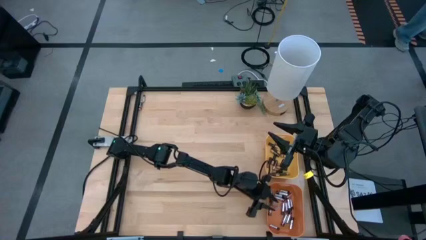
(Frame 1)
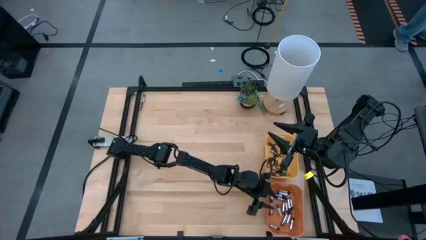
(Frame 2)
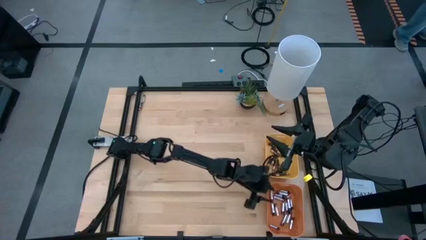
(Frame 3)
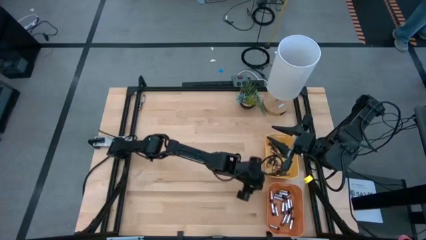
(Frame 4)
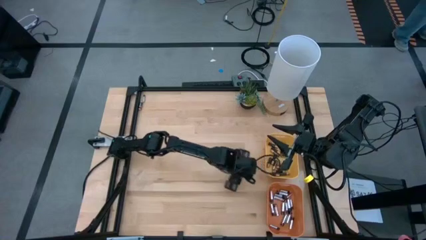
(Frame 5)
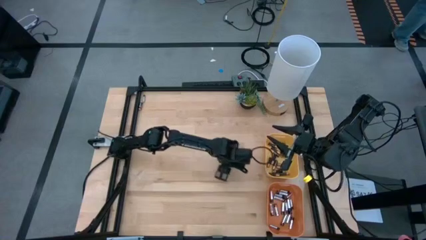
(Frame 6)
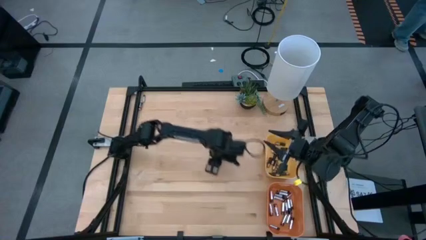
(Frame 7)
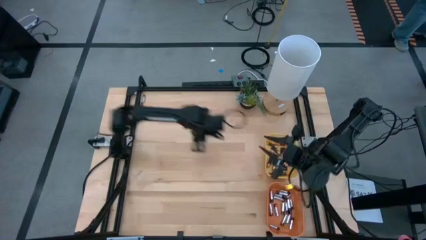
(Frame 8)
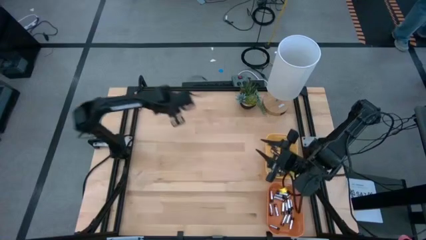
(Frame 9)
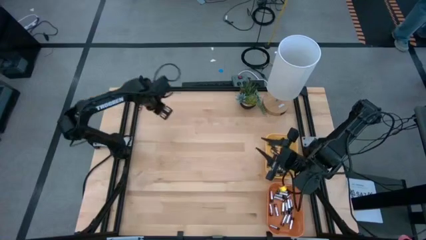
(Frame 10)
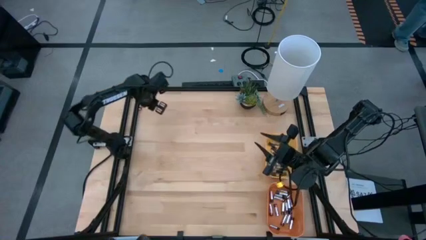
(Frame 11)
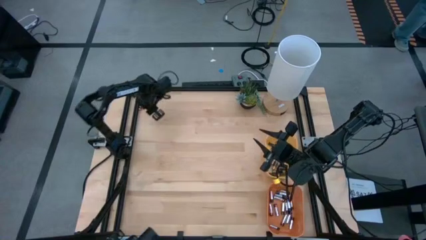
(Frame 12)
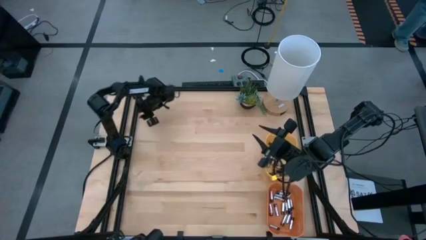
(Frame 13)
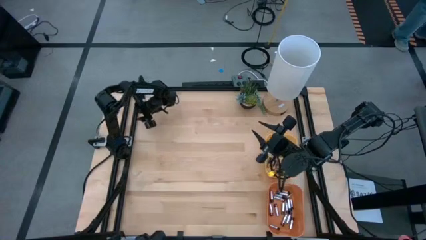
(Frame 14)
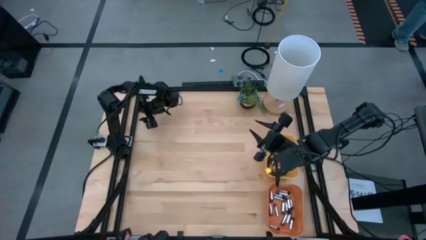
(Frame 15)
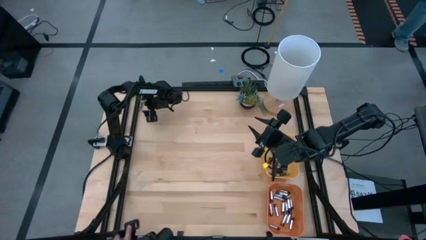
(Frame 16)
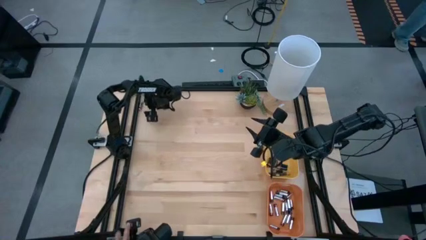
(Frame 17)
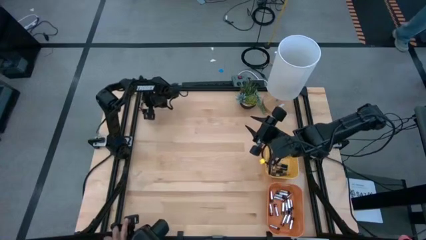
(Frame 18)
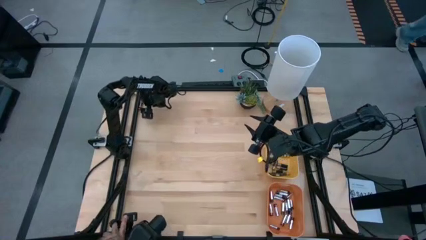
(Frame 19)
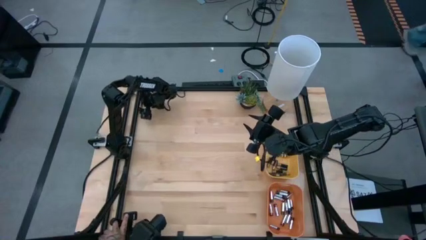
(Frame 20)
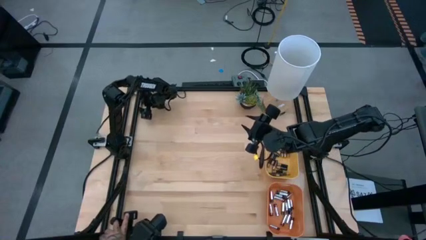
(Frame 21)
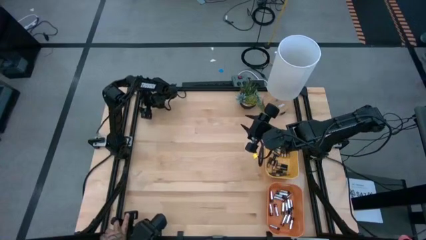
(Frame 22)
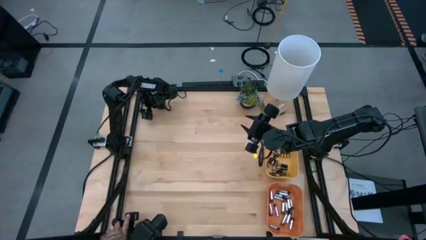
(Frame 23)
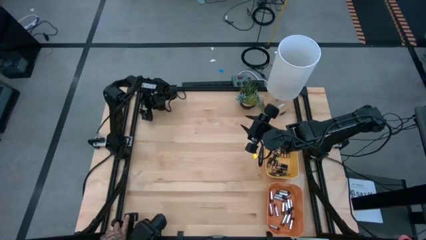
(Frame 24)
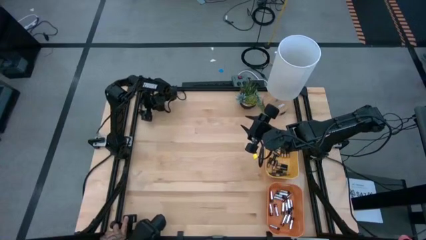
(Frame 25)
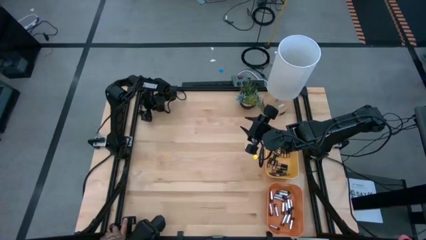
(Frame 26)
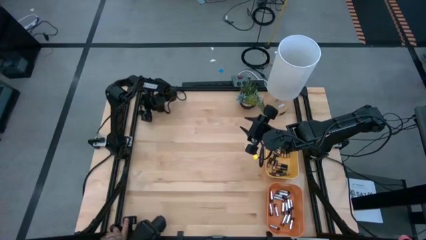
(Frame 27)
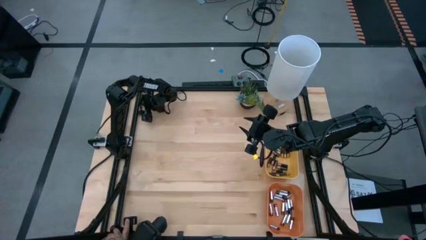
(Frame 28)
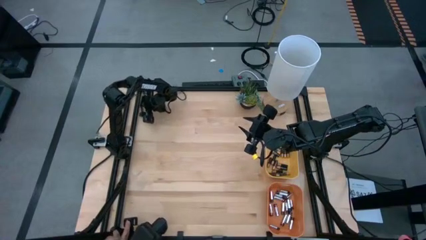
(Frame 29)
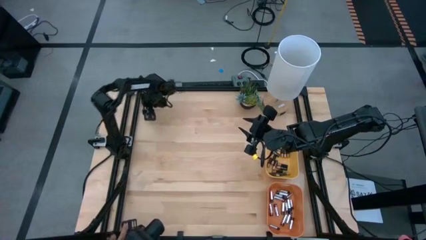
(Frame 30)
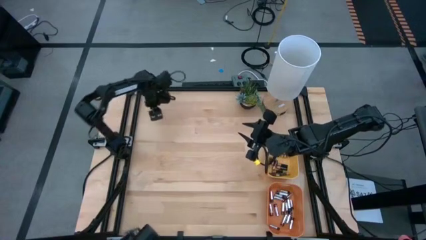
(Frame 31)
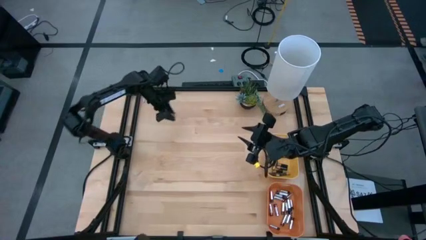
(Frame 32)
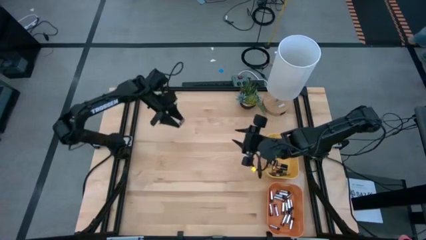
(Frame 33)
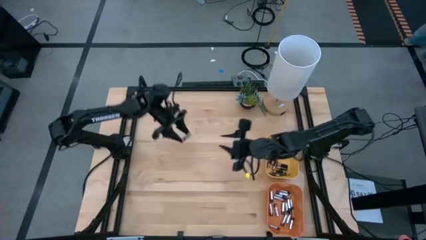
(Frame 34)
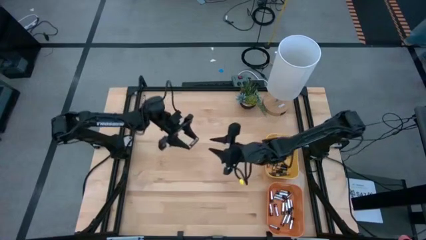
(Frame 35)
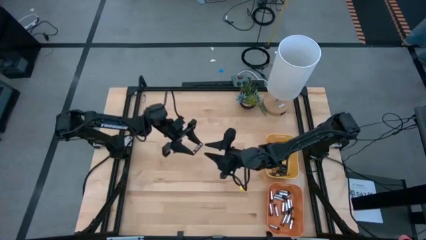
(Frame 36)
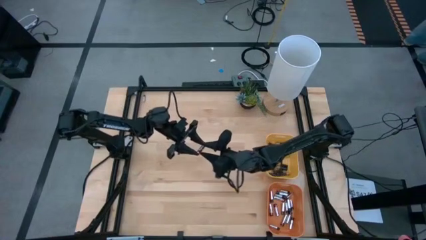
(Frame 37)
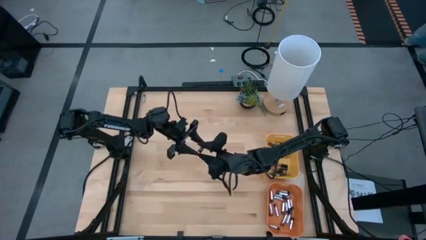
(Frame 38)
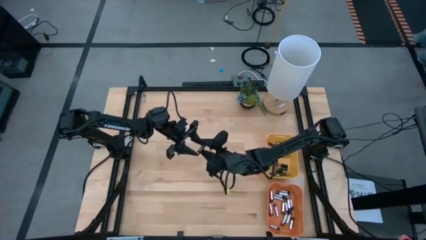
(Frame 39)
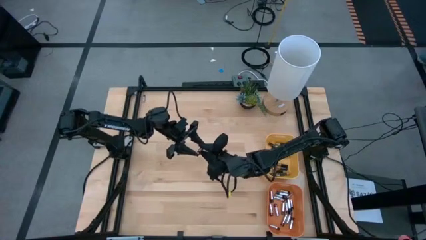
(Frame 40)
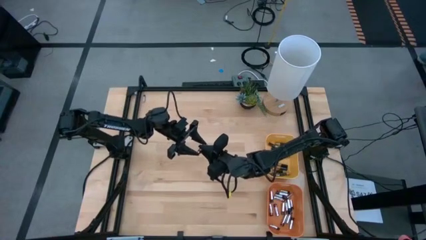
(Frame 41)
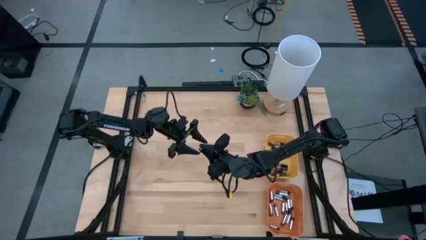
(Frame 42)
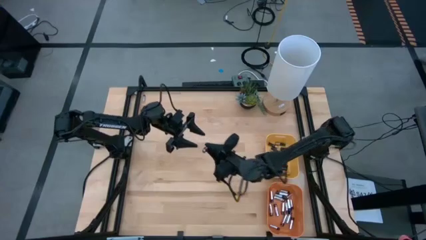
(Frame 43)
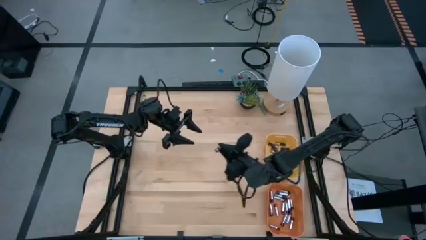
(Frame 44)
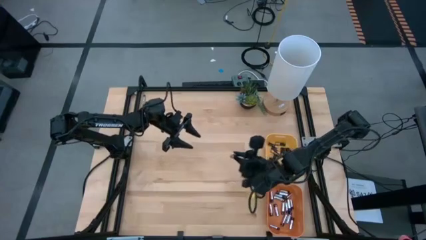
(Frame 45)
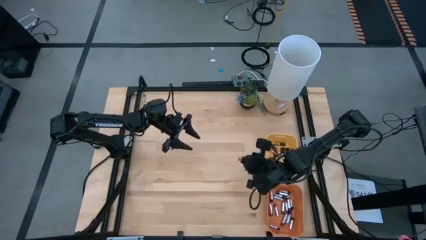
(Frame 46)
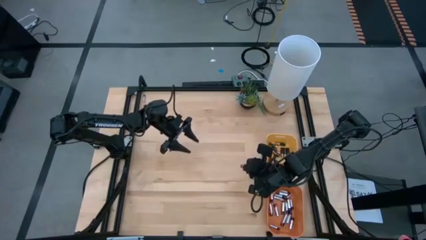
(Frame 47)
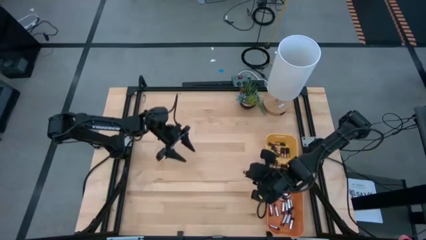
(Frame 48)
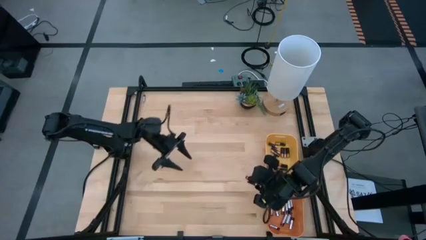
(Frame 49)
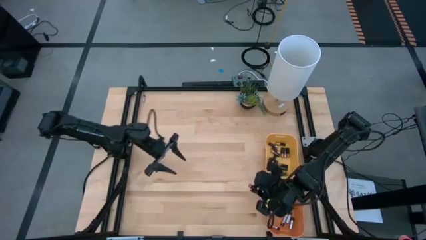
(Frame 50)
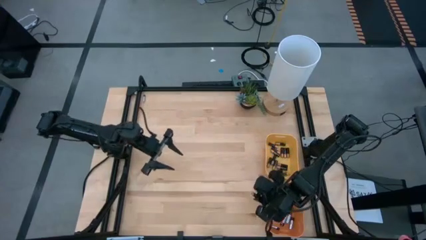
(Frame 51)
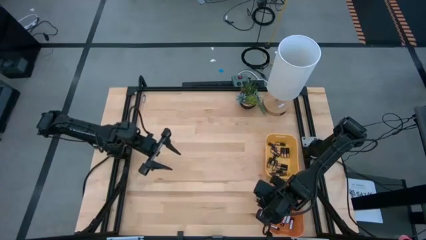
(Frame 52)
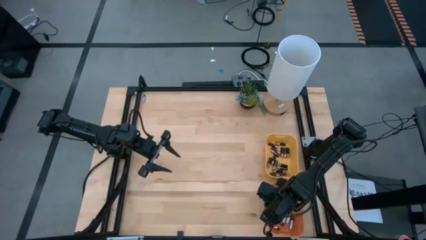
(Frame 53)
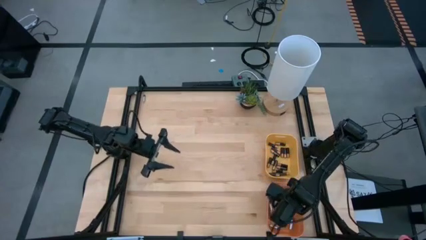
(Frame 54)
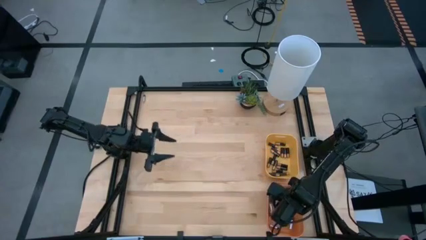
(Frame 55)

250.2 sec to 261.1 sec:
Task: Sort batteries
Put the black battery into the orange bin

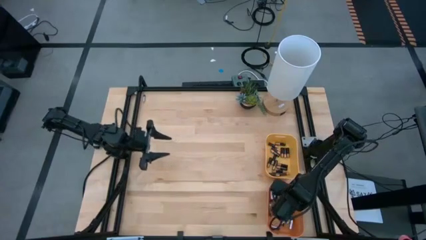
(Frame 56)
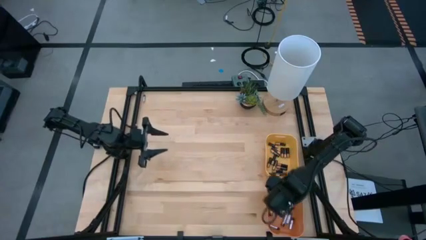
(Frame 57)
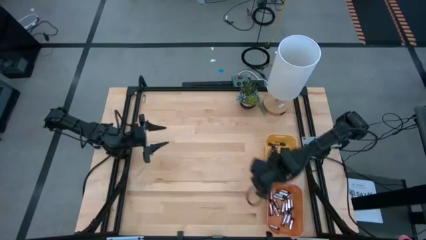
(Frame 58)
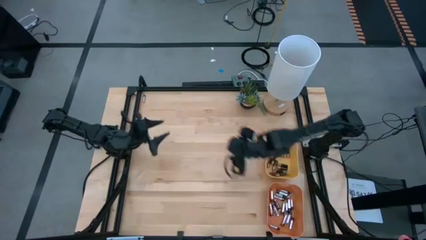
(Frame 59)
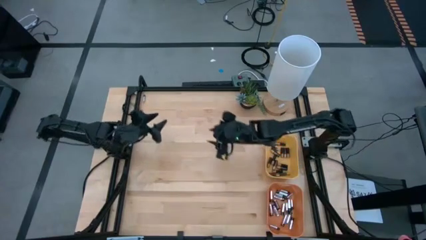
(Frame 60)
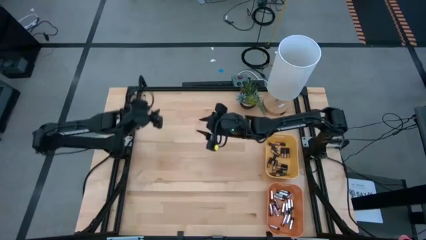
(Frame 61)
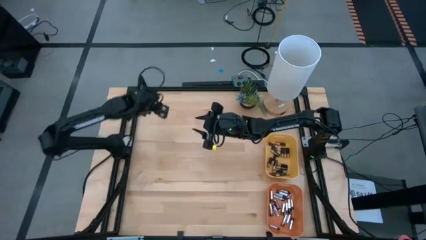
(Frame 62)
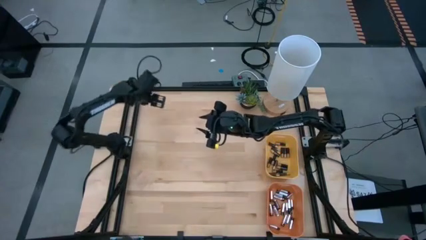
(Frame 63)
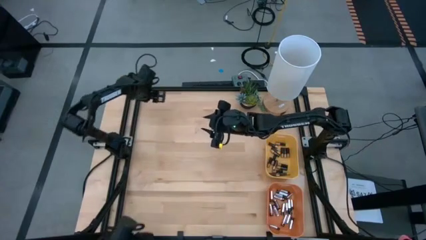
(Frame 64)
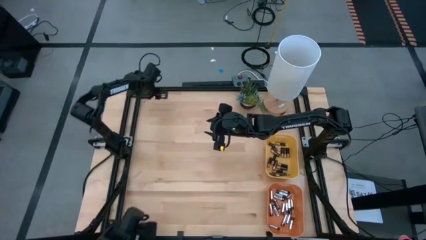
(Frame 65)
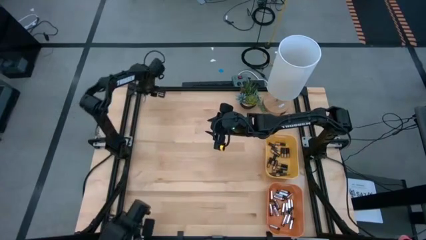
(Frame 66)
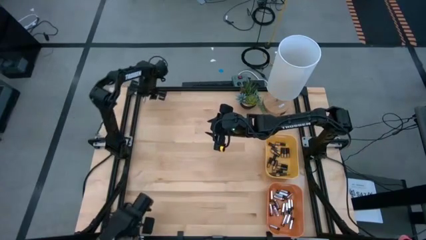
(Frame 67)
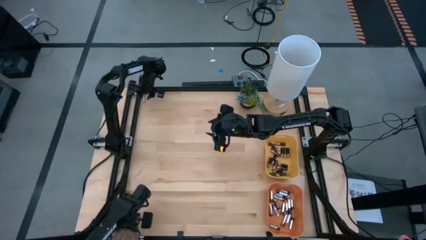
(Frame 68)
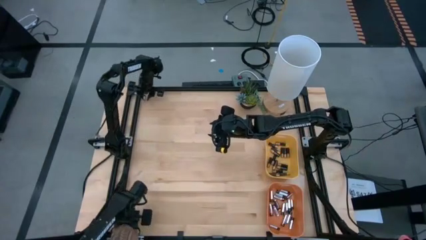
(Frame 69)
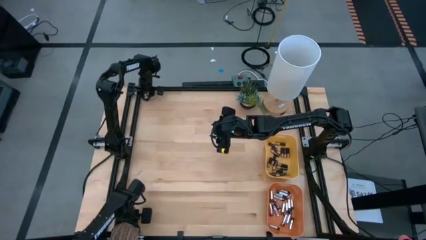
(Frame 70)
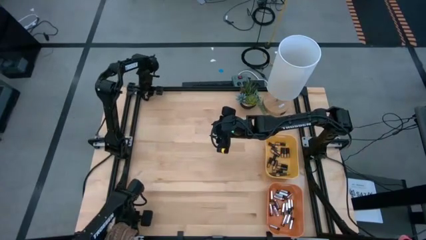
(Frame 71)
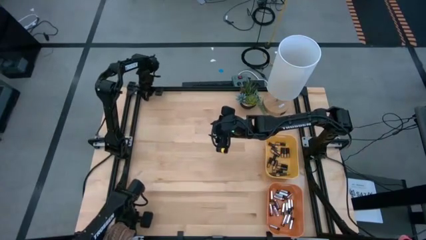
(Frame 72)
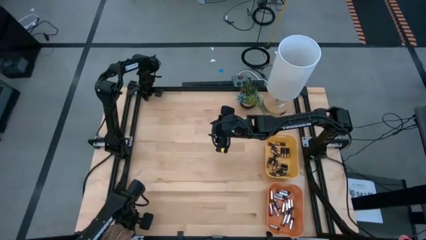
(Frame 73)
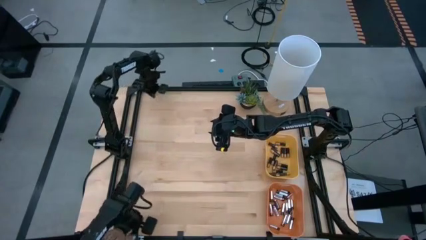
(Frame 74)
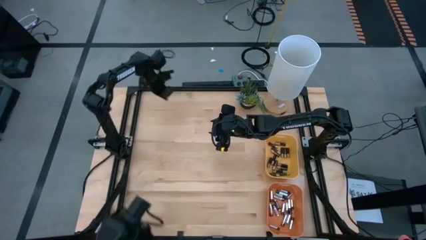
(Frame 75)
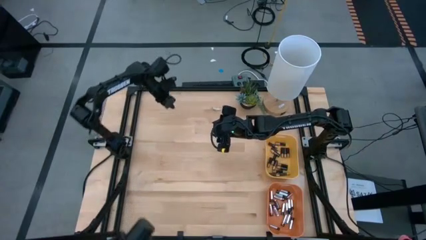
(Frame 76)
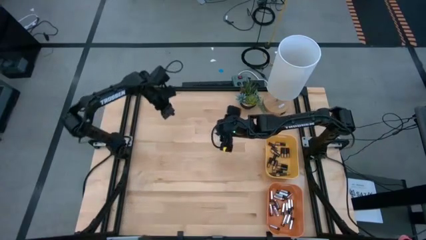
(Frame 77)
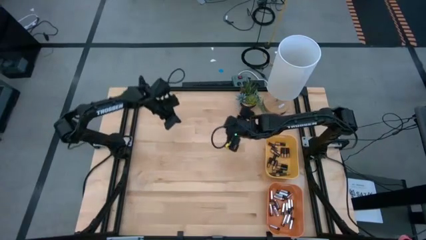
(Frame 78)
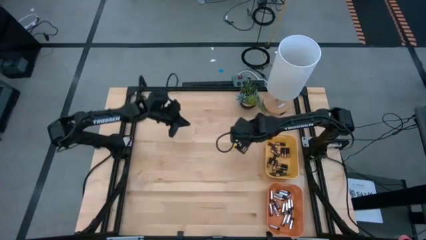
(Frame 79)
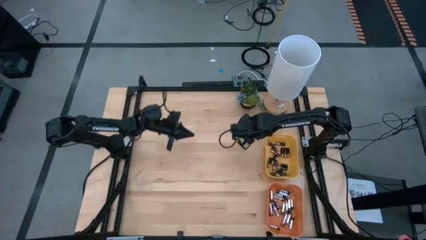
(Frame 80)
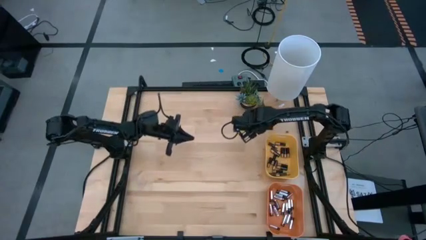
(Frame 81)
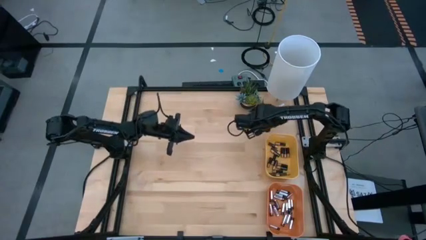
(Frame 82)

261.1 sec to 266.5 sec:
Put the black battery into the orange bin
